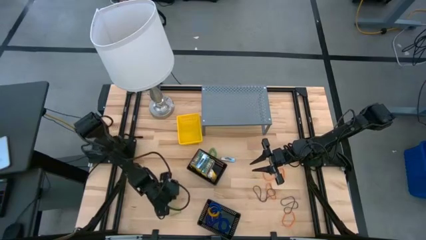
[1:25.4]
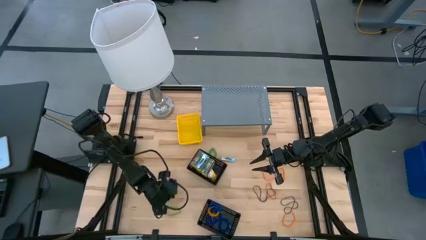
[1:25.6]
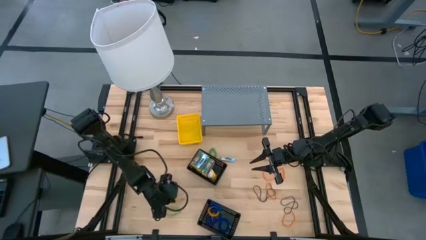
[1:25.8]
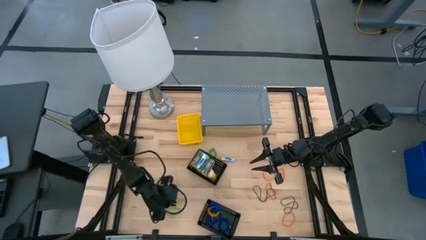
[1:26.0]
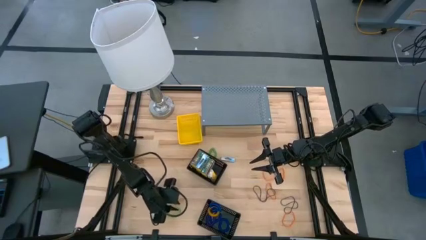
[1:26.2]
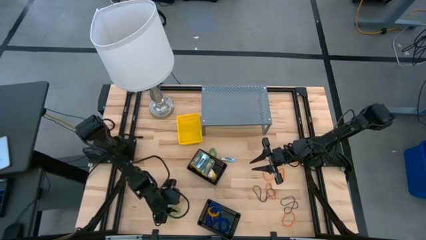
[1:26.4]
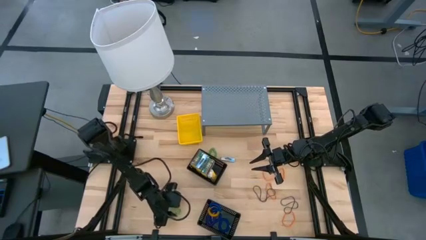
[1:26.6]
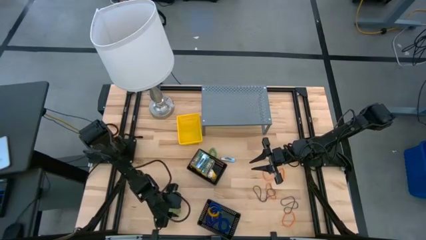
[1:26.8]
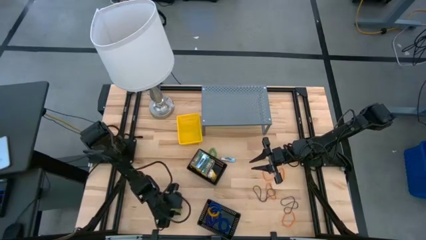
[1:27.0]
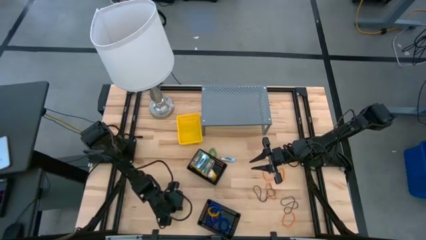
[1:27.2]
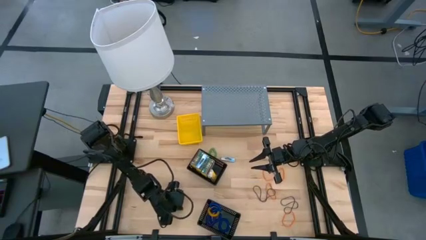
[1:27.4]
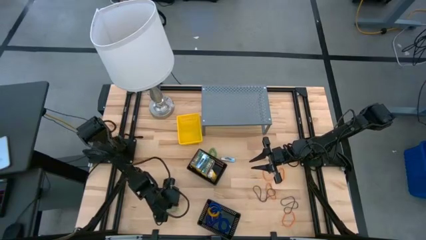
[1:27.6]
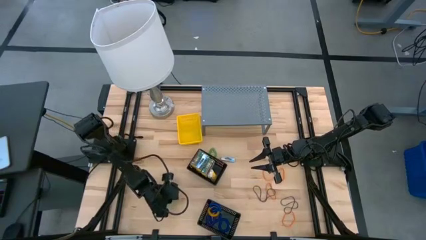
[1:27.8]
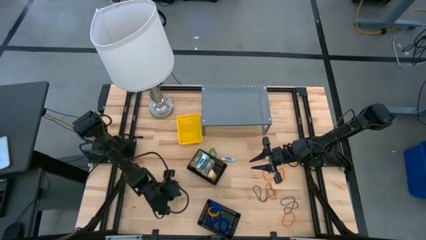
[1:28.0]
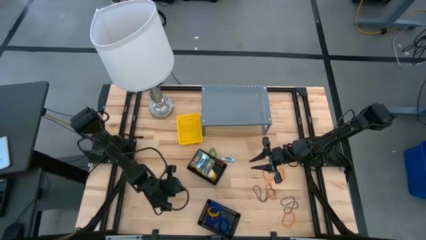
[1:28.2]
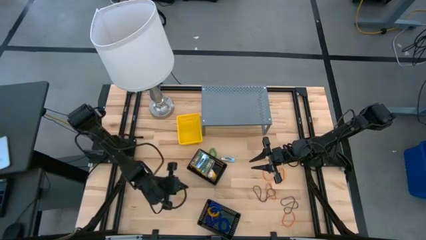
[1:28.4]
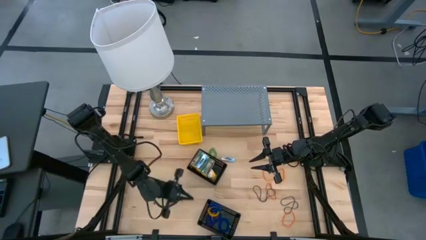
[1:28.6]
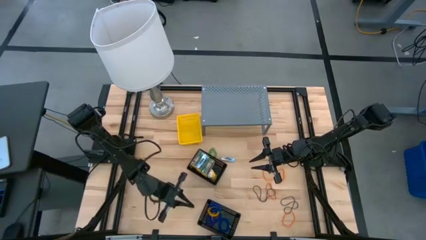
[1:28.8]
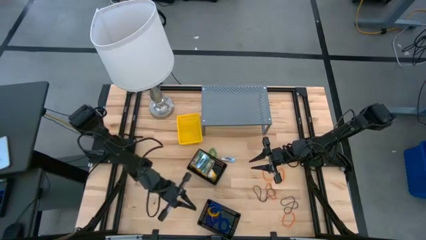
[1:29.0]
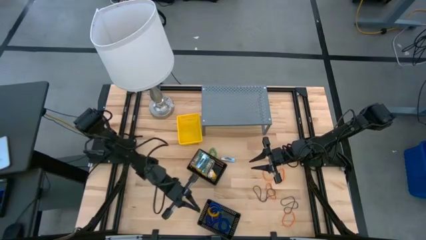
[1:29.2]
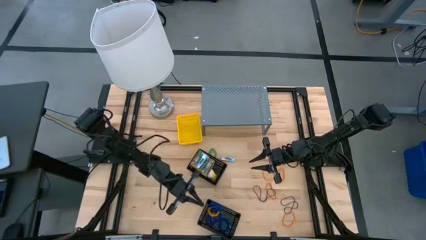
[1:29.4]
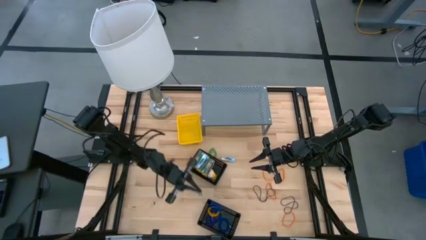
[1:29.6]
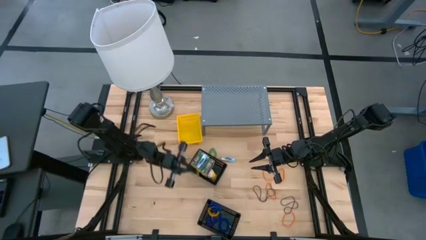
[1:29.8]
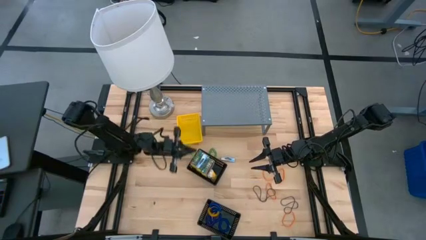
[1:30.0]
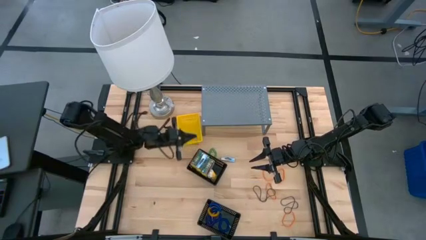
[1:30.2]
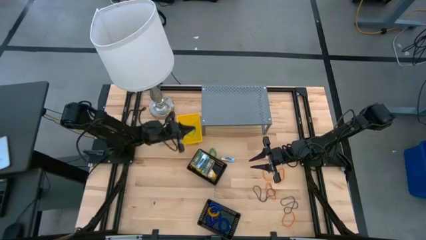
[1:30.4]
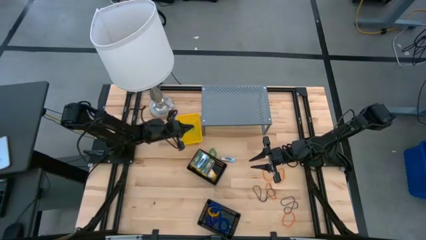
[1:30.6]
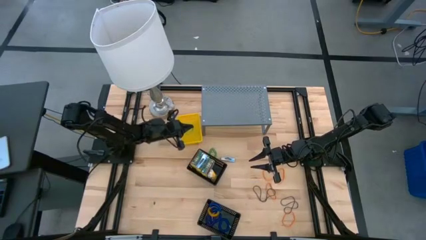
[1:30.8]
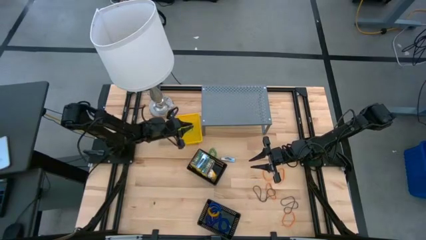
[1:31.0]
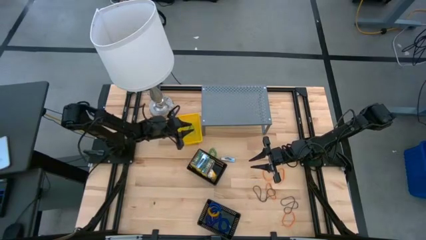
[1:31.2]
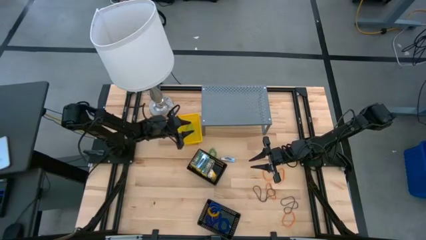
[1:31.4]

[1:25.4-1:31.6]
Task: Pick & Place Office Desk Supplies
Put the green rubber band into the yellow bin

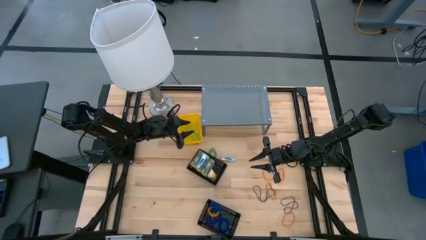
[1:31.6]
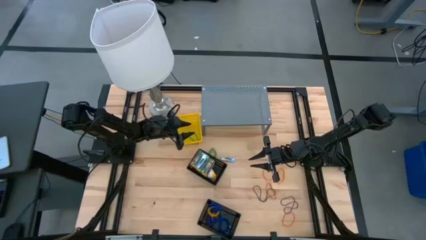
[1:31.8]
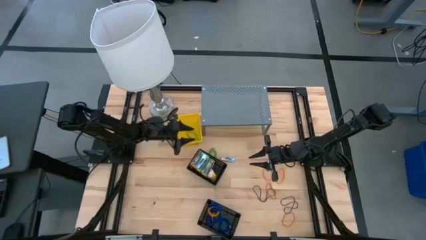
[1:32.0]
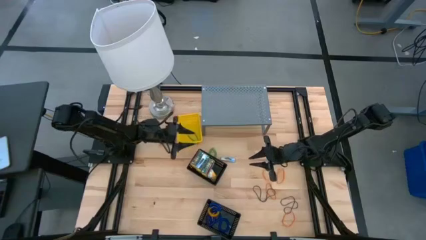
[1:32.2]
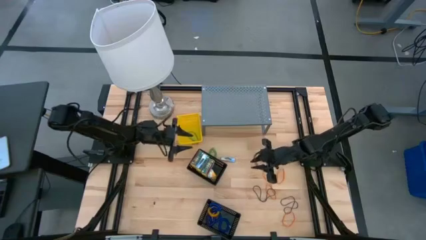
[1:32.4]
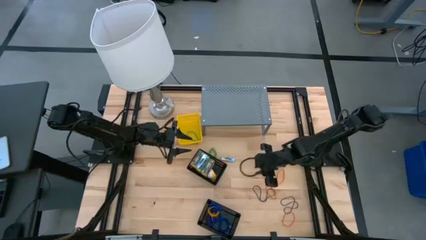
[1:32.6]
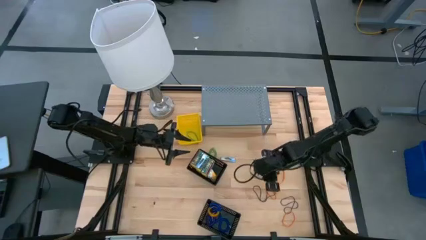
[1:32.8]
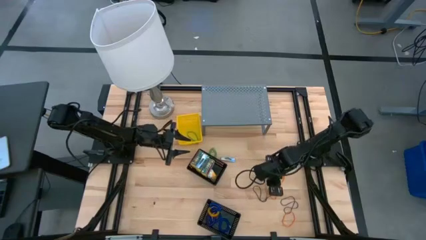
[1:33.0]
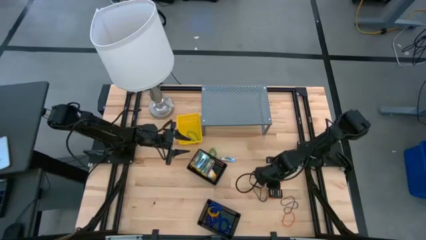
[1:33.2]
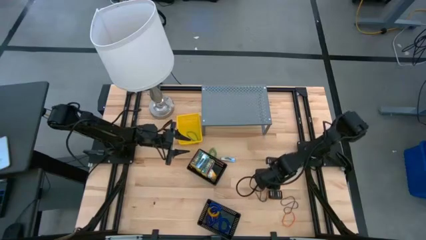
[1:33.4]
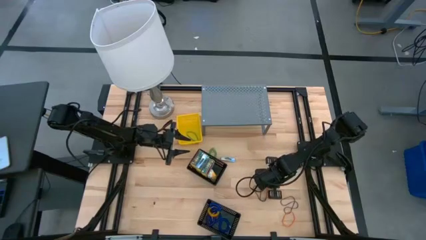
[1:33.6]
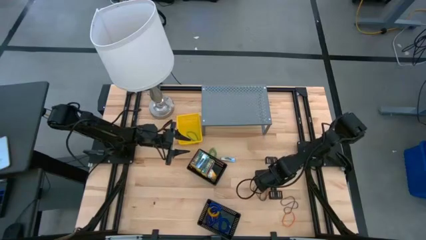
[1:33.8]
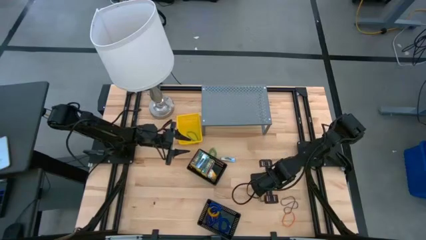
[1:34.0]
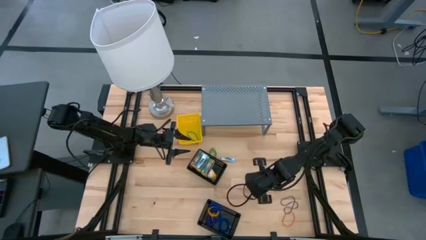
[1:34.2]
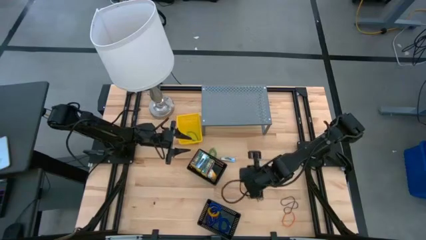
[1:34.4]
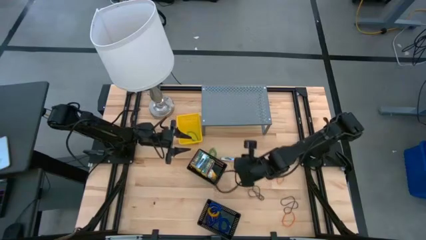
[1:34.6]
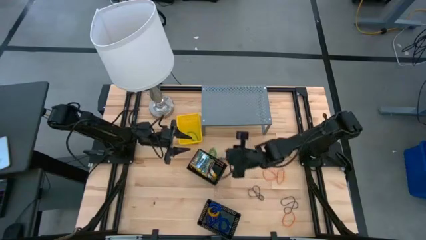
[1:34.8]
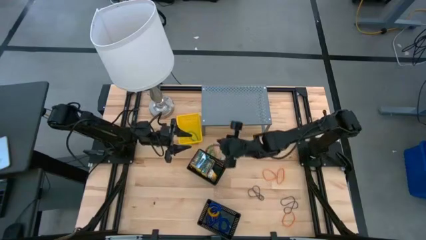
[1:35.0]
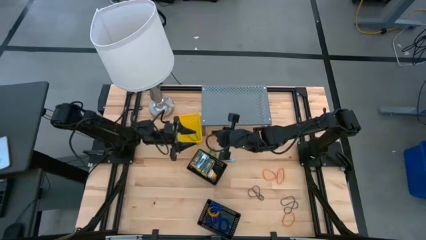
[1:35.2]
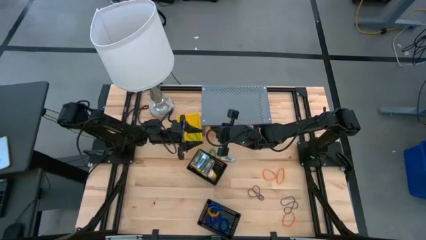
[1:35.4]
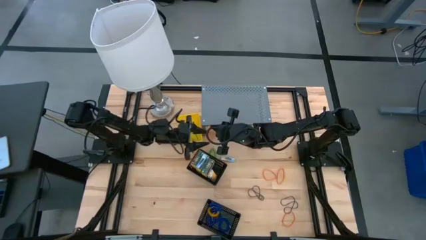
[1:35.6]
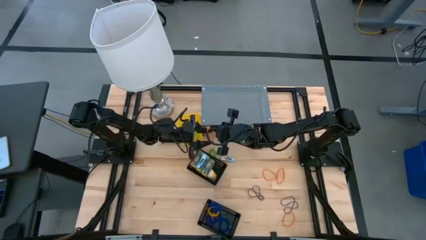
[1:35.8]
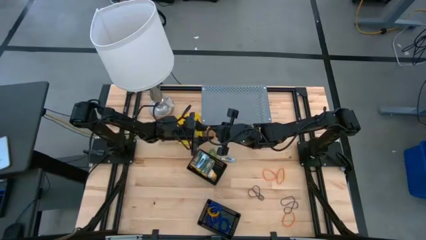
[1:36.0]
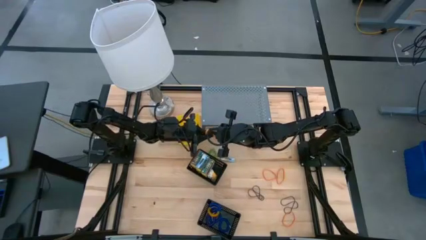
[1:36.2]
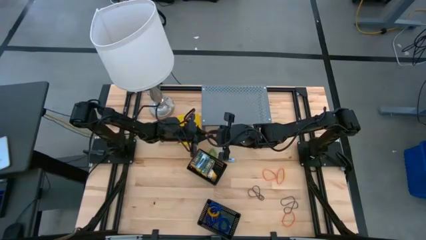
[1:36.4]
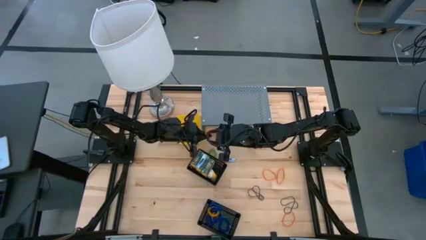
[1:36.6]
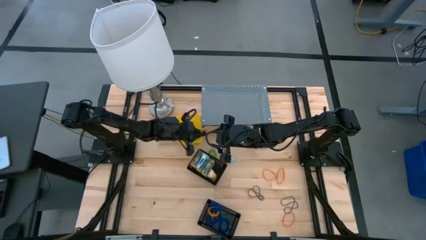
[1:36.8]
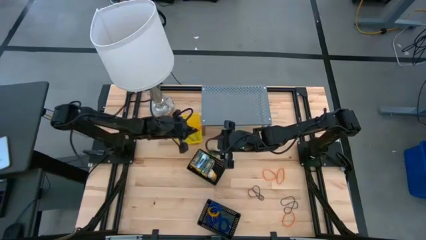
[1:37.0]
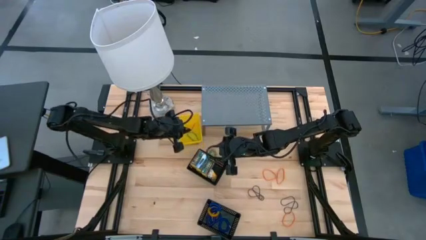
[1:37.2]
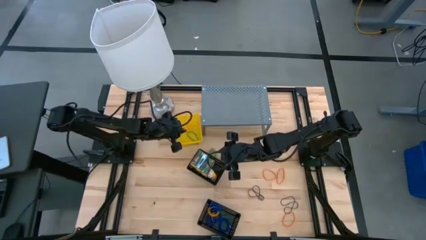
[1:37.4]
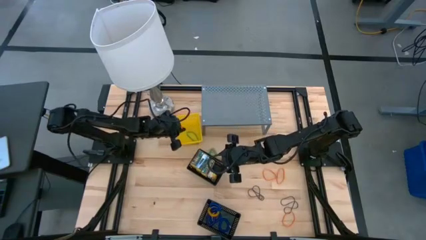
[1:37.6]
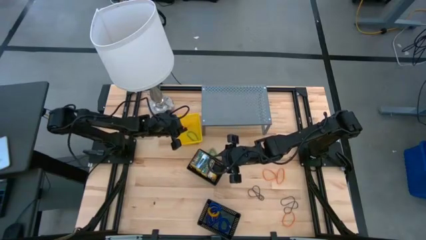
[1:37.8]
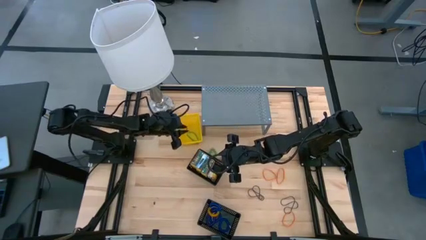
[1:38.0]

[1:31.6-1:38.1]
Put the orange rubber band into the yellow bin

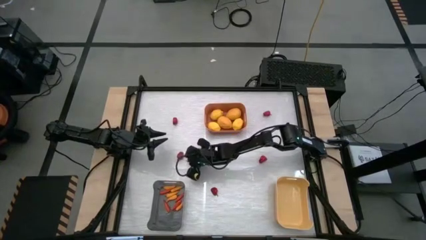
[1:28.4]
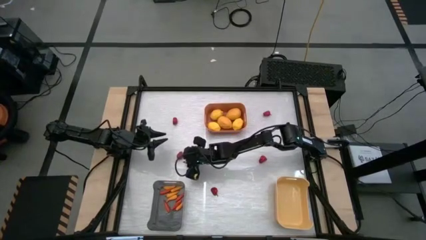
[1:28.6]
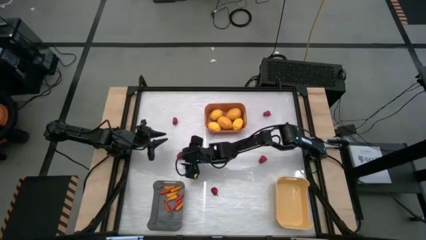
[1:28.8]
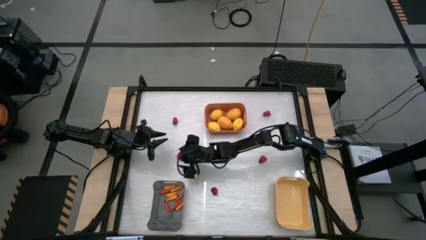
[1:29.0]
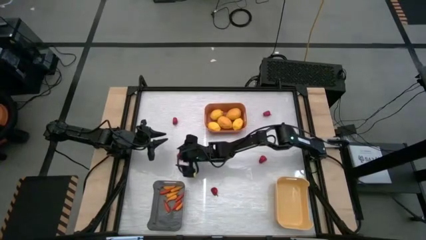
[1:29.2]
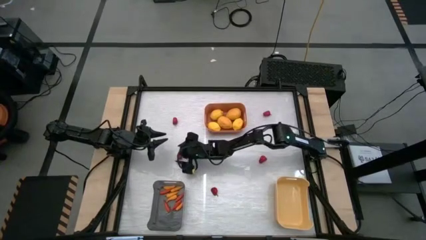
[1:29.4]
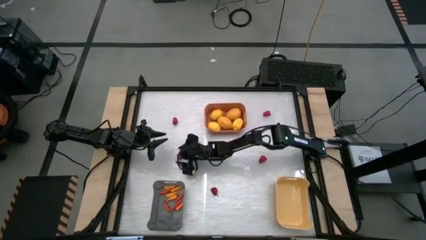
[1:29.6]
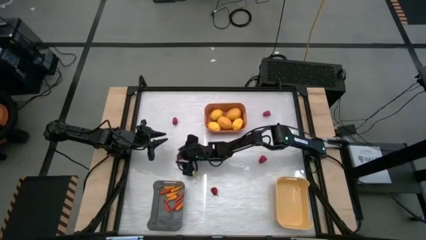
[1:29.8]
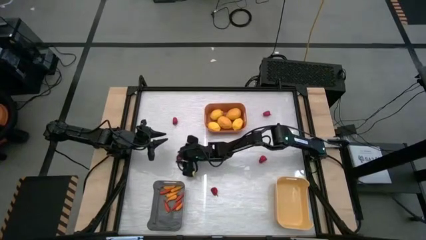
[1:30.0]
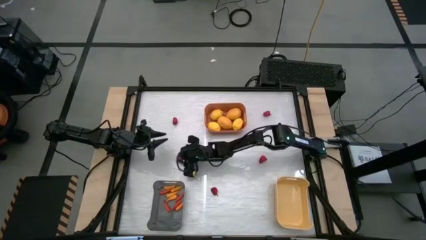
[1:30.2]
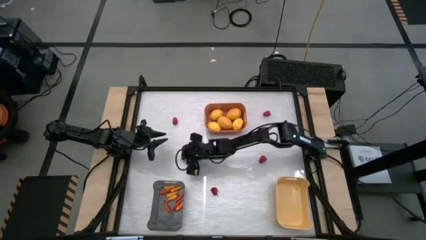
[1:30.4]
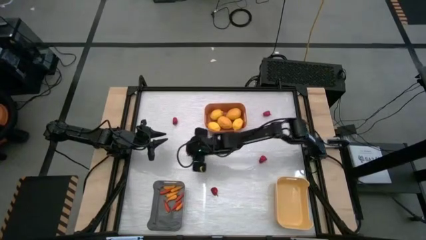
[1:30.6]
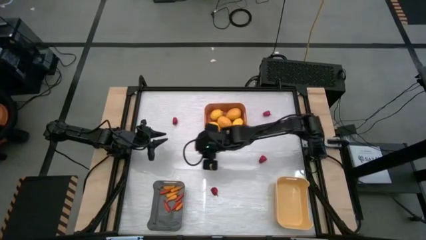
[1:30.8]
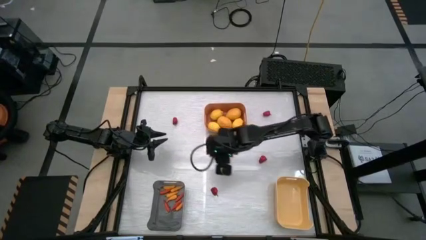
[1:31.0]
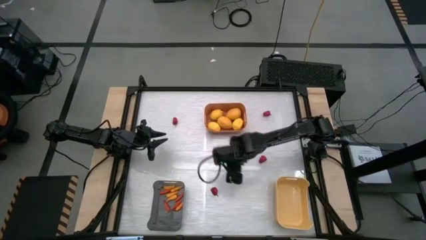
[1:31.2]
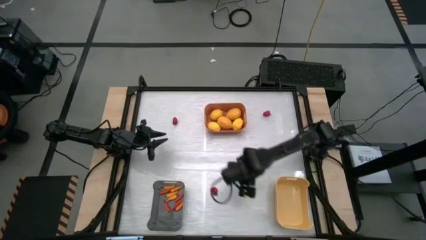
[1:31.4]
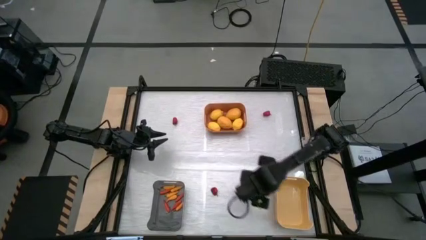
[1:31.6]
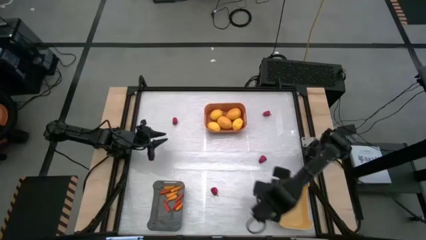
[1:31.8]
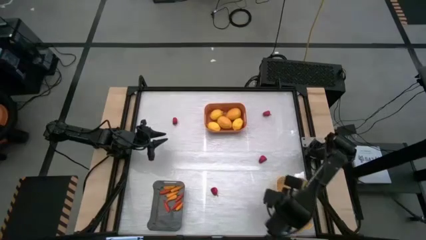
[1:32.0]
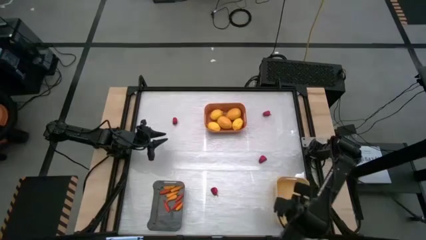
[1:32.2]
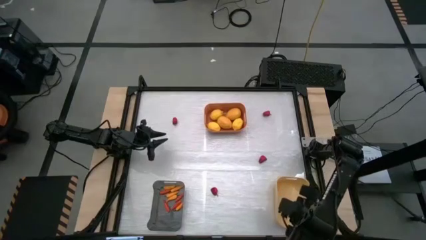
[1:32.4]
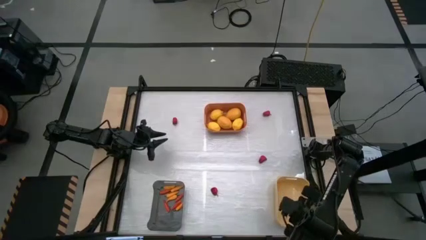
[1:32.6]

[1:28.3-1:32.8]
Task: Sort produce into baskets
Put the red chili pepper into the yellow bin

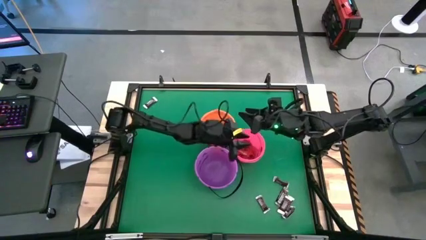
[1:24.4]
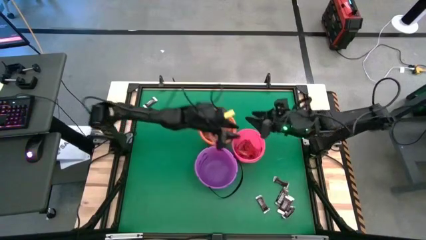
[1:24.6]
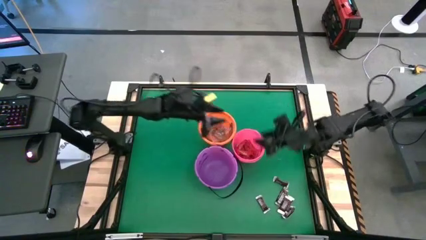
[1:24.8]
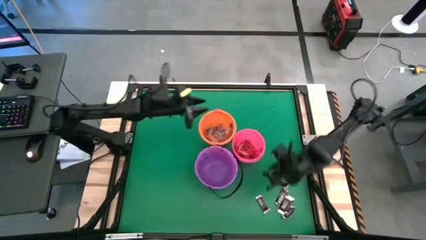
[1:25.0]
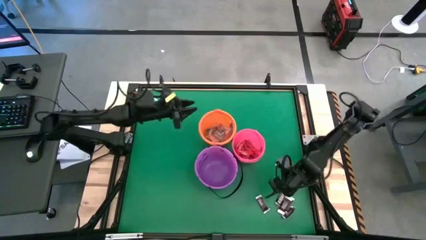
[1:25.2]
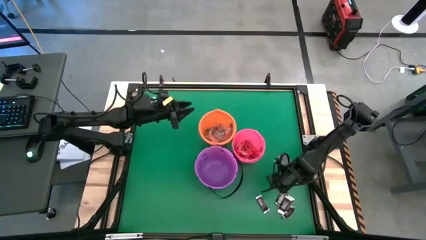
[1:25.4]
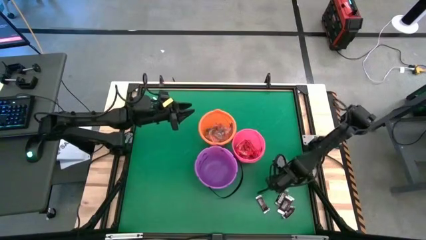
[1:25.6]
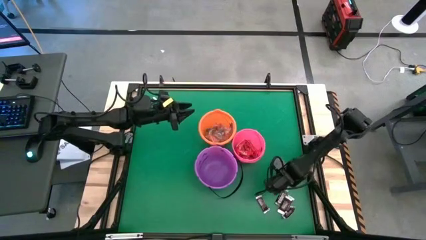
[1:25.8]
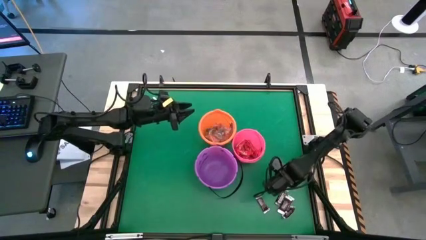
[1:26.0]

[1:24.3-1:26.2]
Task: Sort candy by brand, put in halloween buckets
Put the brown chocolate bar into the purple bucket
